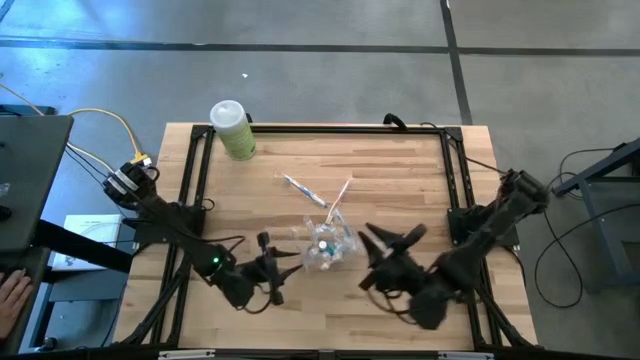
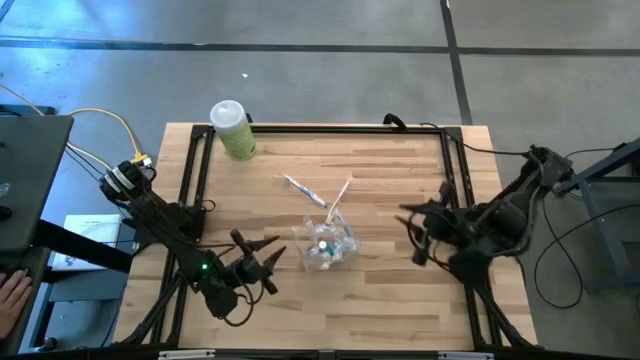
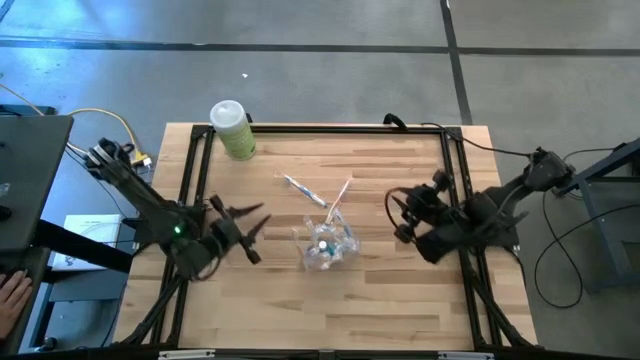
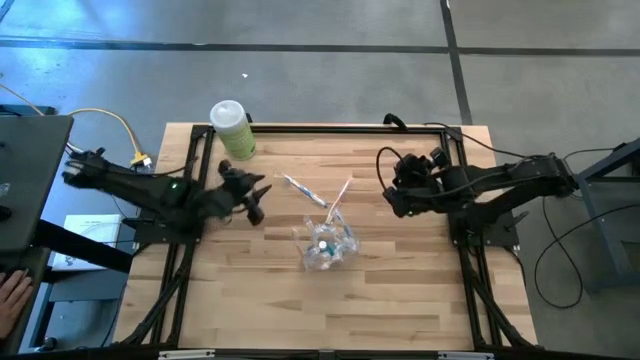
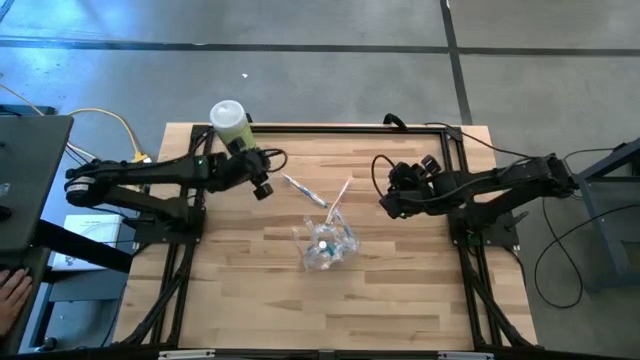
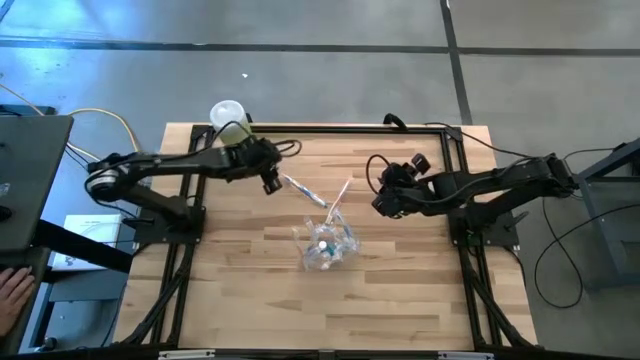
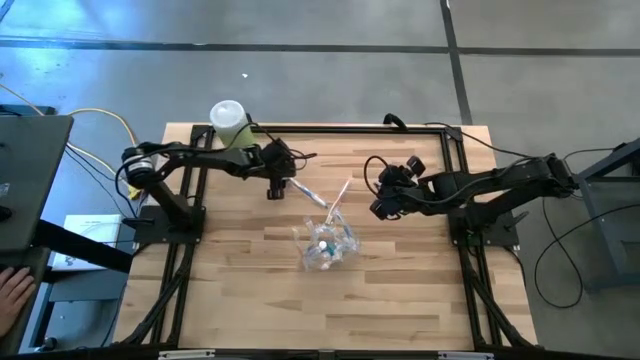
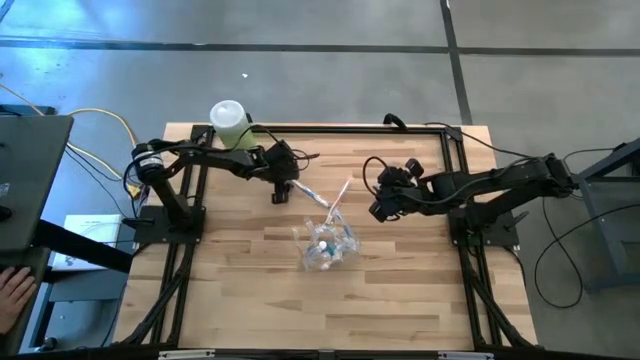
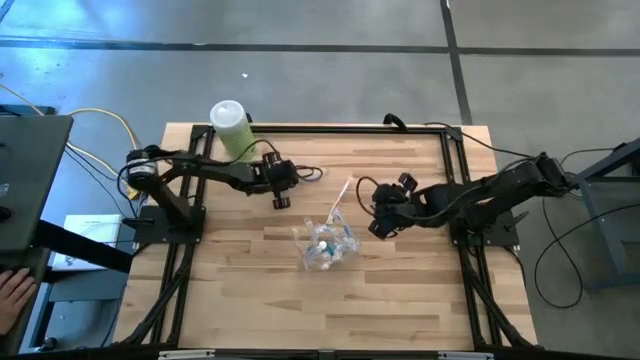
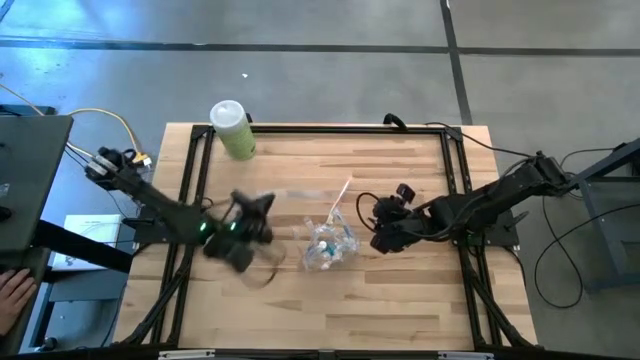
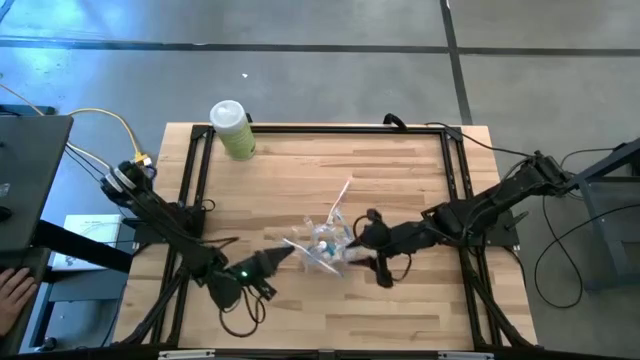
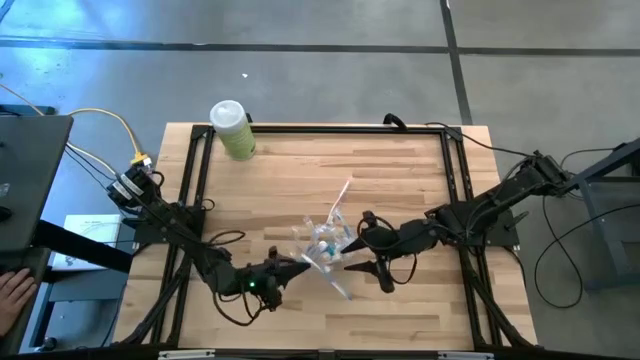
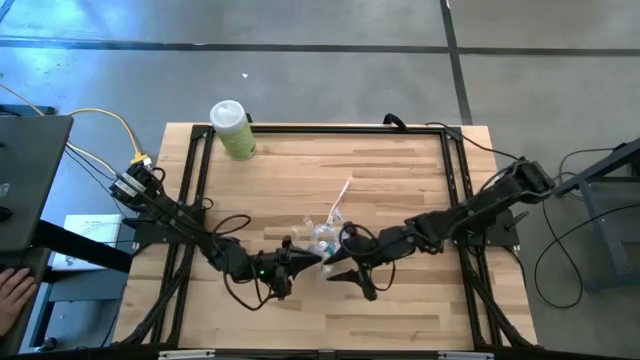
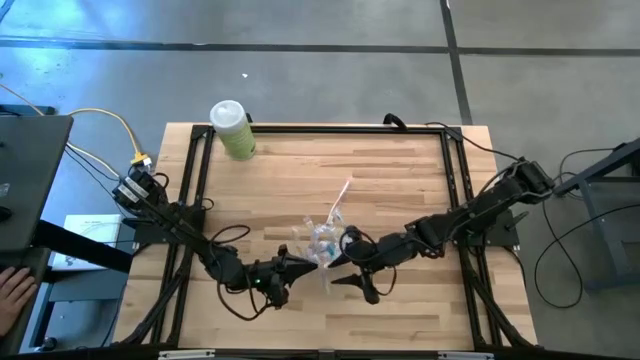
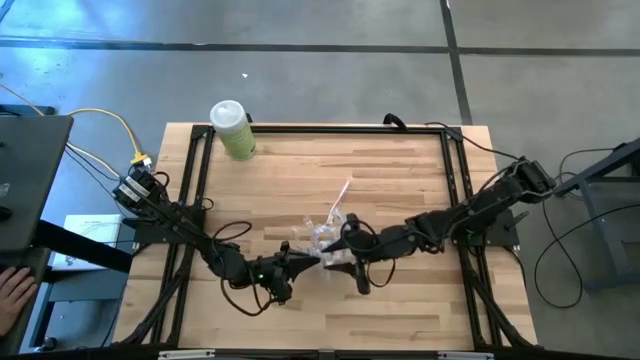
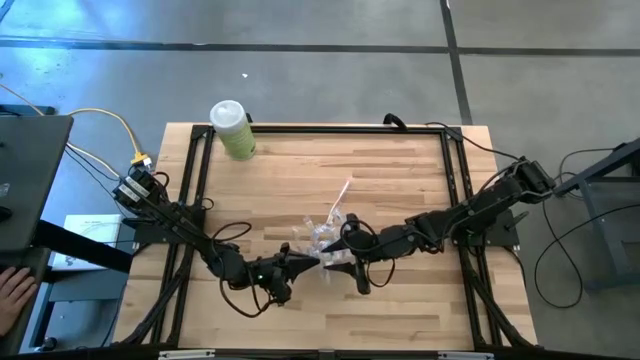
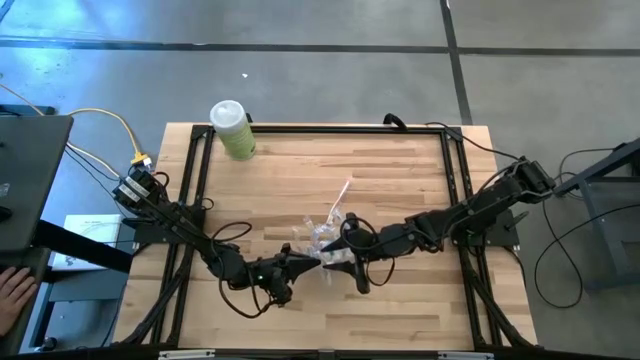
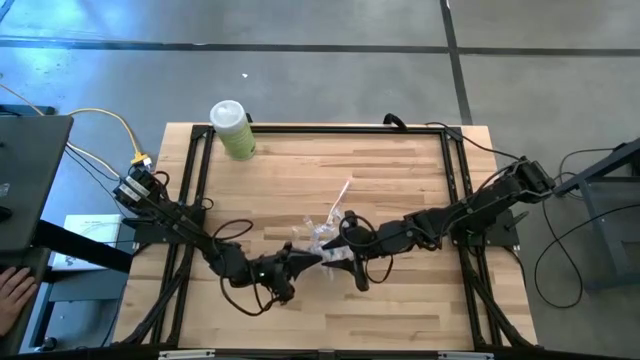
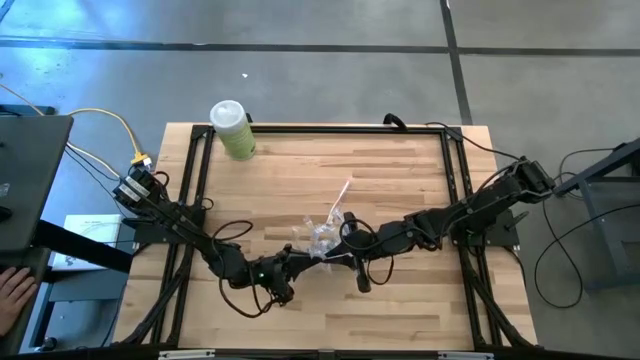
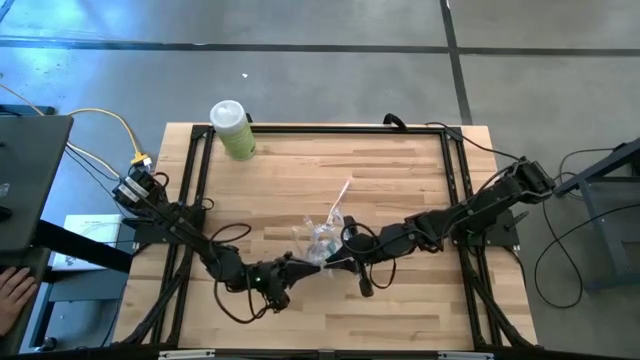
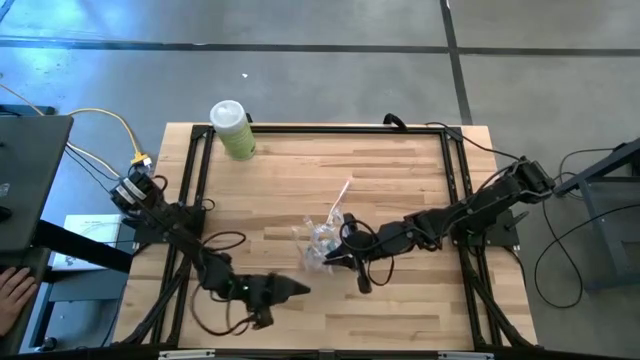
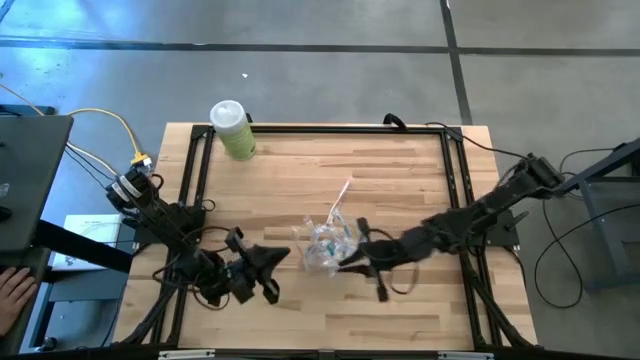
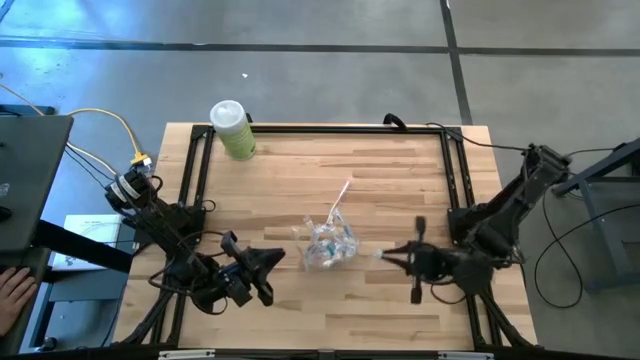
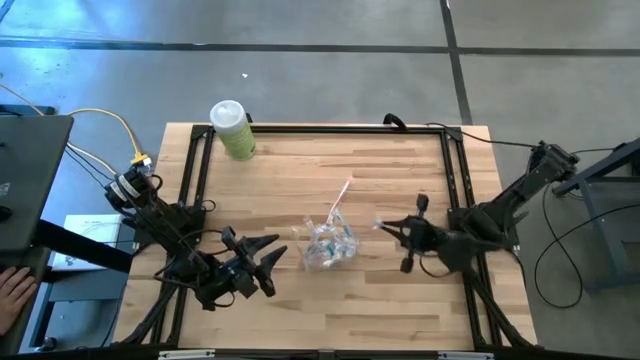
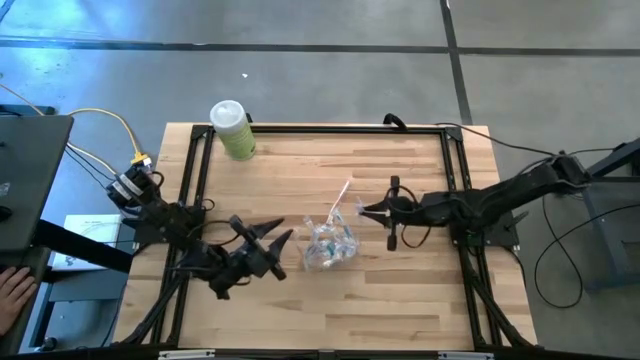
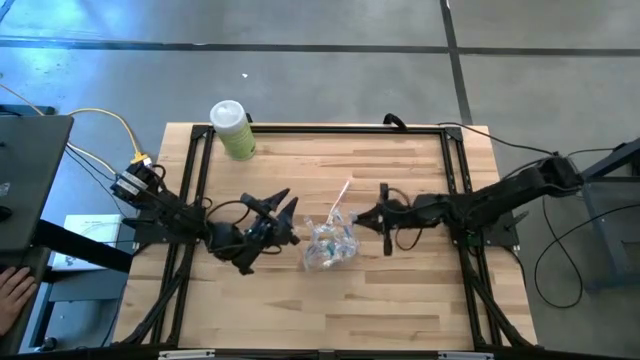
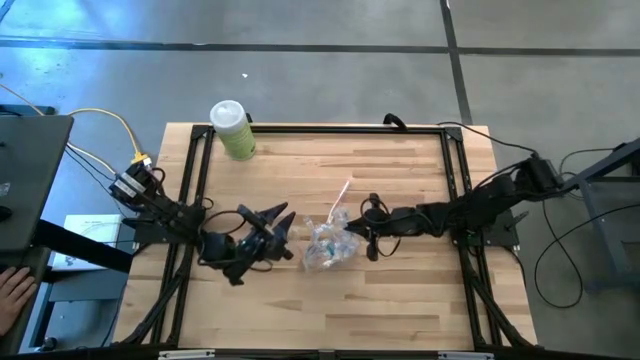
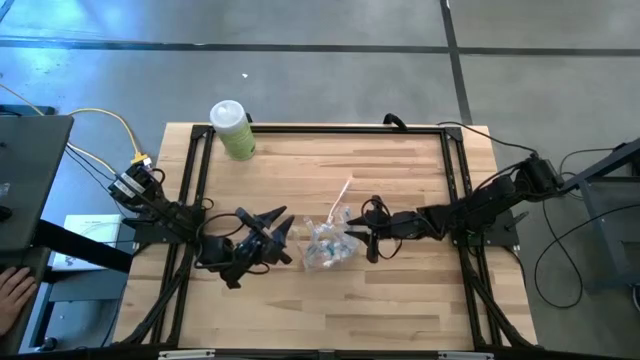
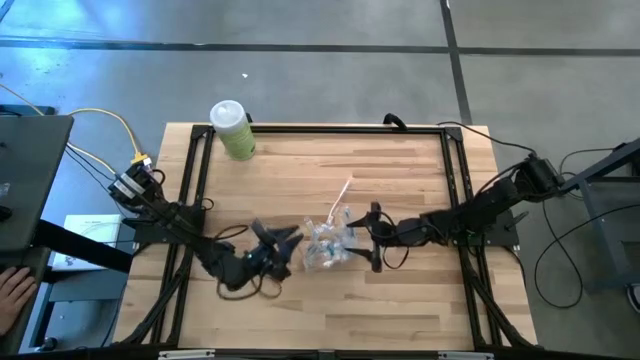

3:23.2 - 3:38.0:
Task: Pick & Place toothbrushing station
Put the blue toothbrush into the transparent organizer

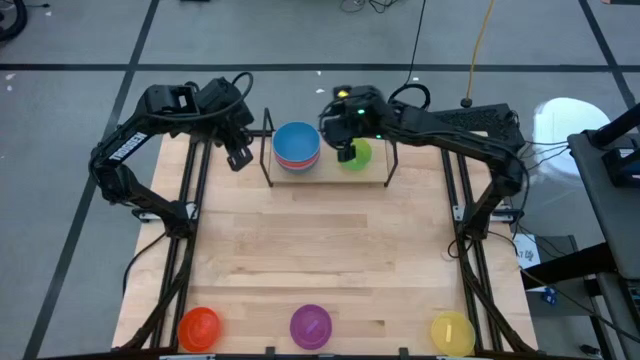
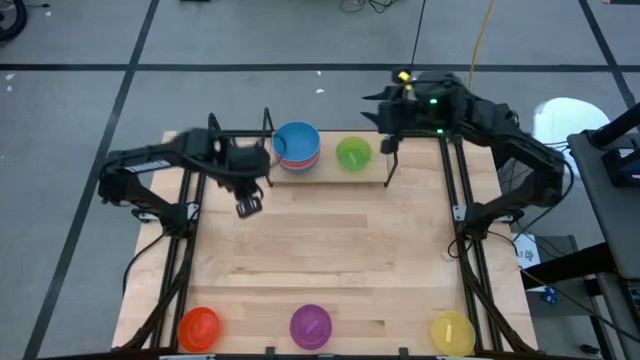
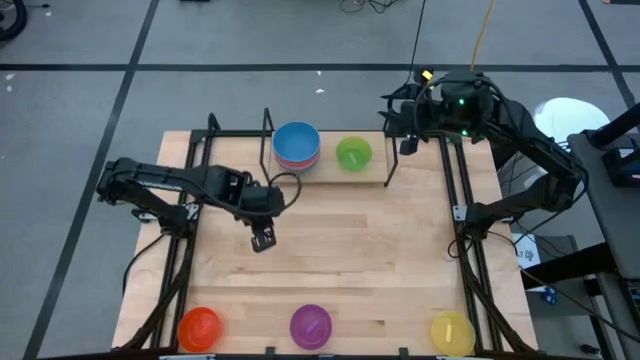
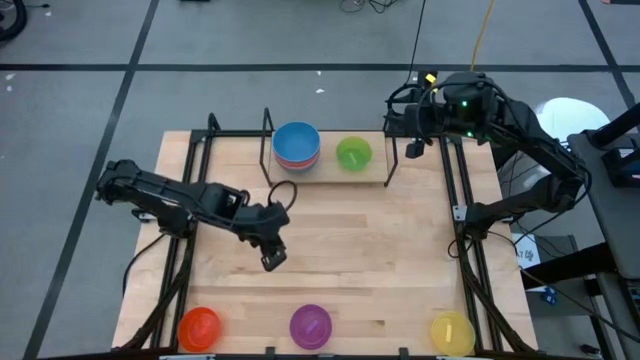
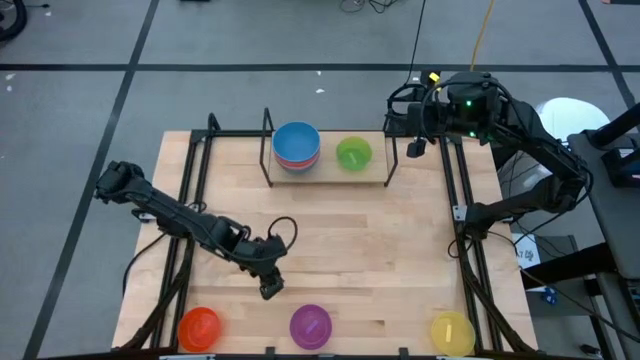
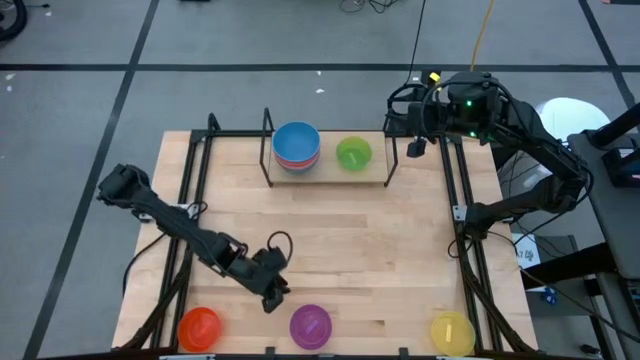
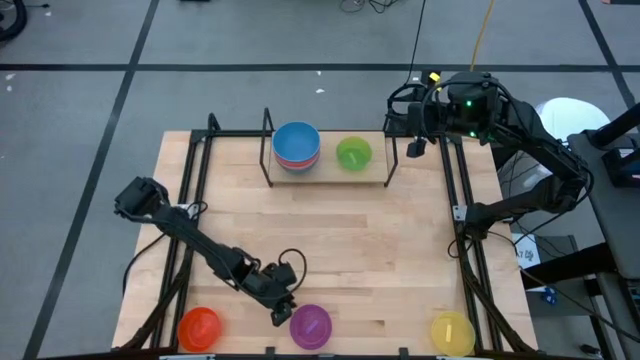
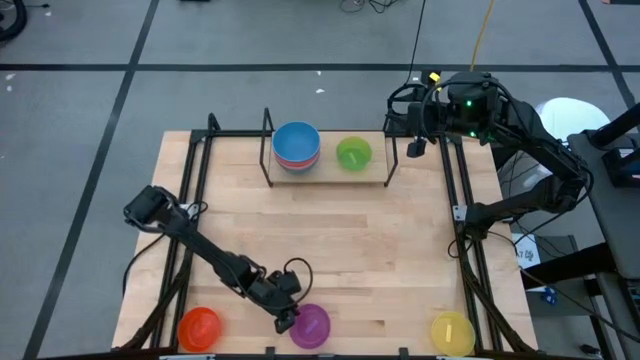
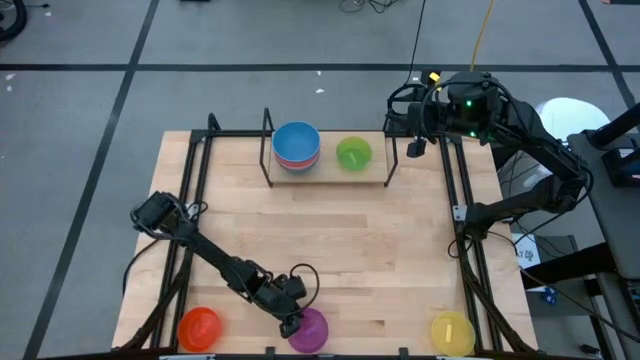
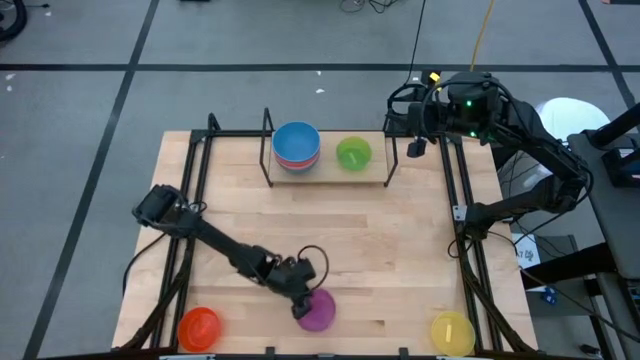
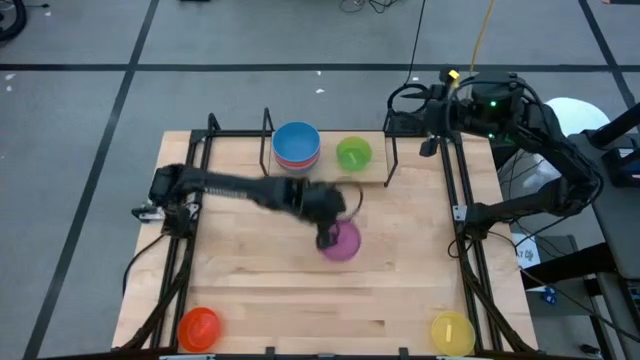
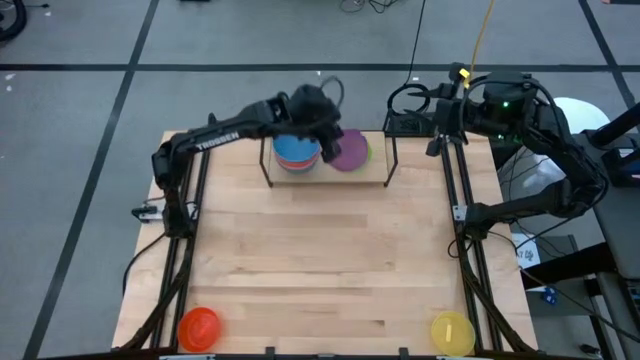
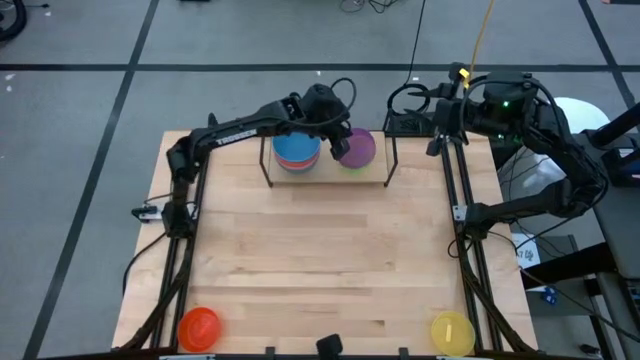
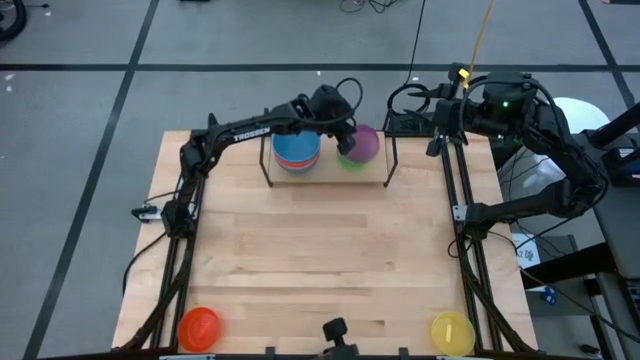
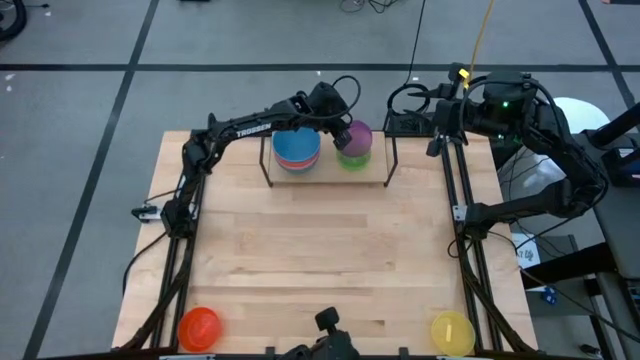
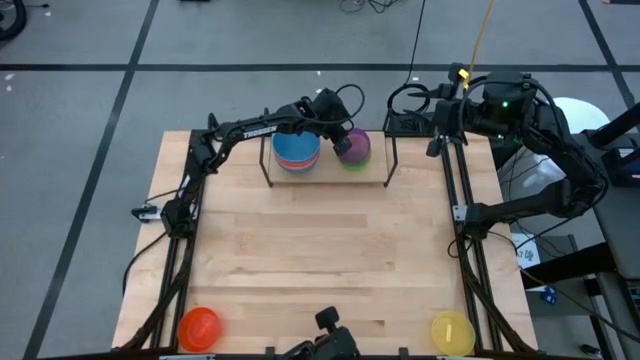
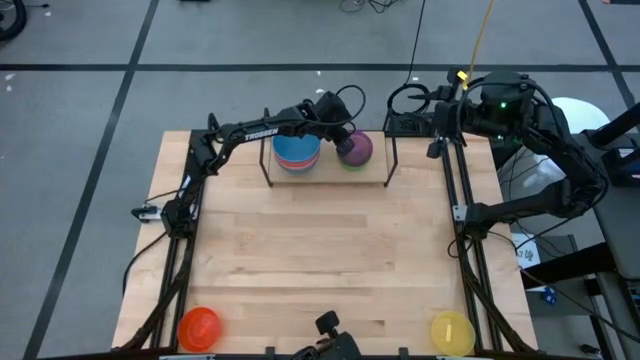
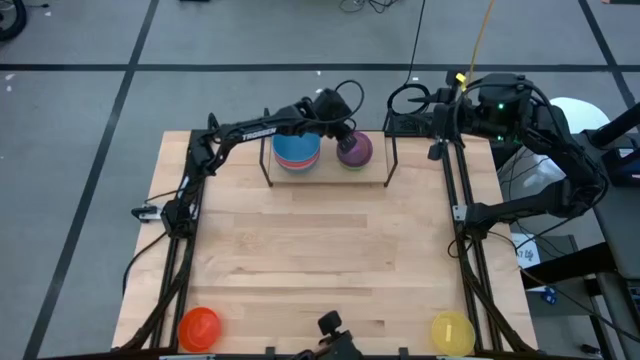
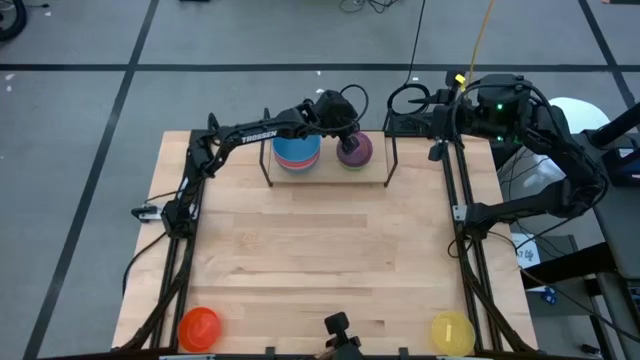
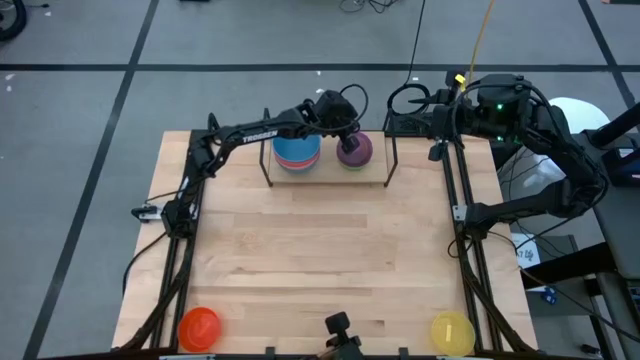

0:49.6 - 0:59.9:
Task: Place and stack bowls onto a shelf
Stack the violet bowl on top of the green bowl on the shelf
